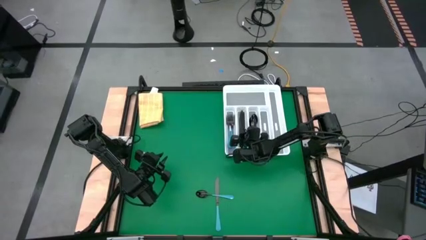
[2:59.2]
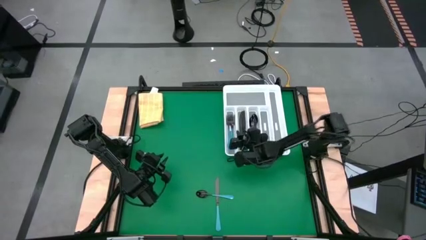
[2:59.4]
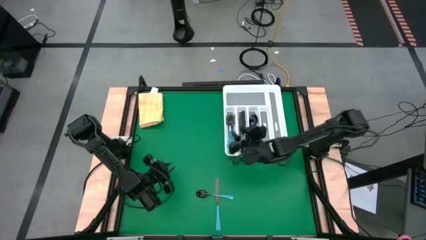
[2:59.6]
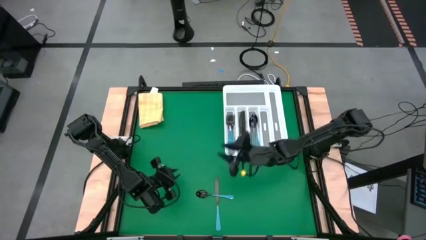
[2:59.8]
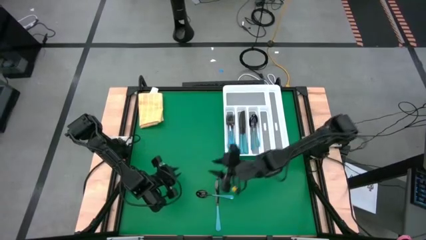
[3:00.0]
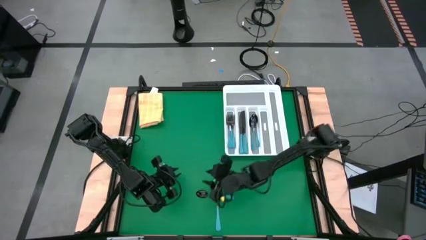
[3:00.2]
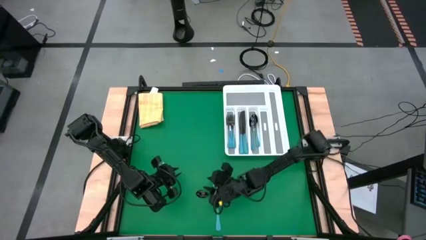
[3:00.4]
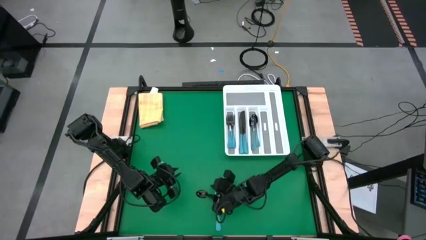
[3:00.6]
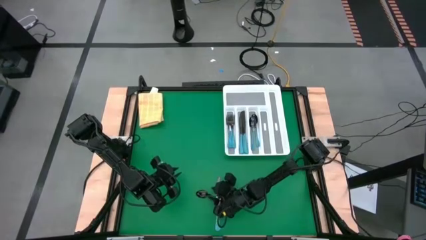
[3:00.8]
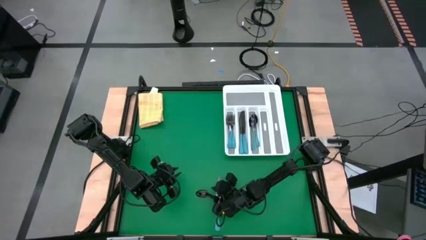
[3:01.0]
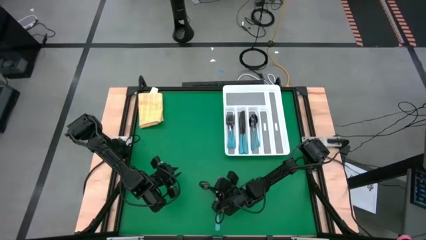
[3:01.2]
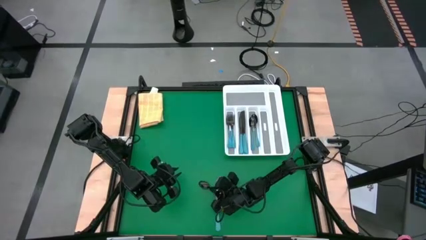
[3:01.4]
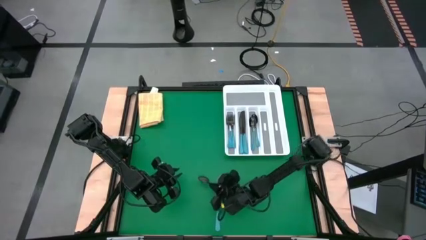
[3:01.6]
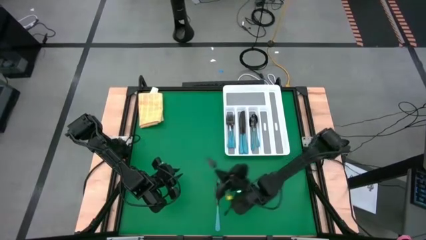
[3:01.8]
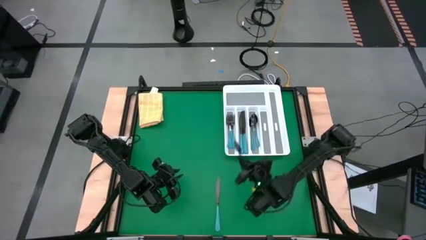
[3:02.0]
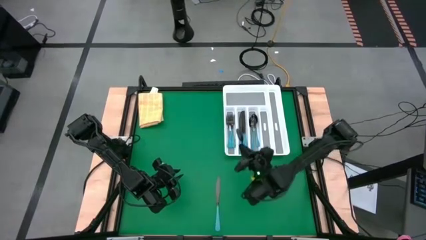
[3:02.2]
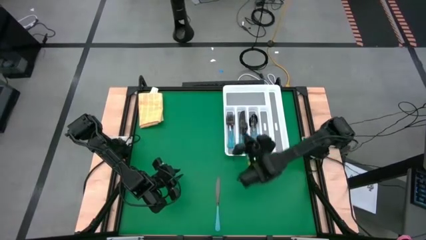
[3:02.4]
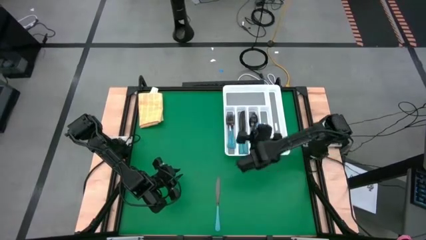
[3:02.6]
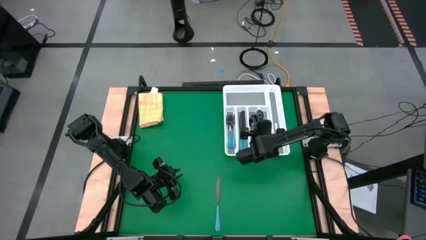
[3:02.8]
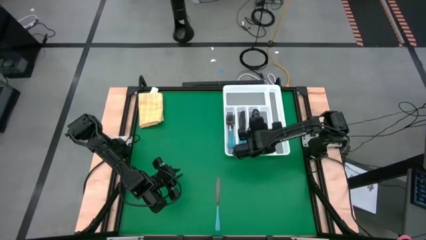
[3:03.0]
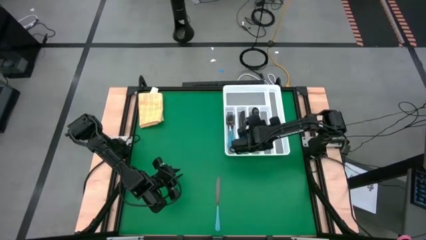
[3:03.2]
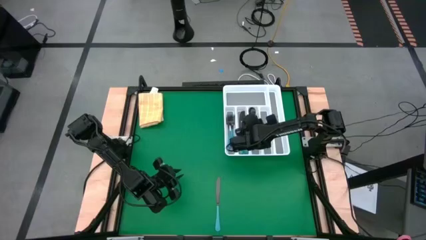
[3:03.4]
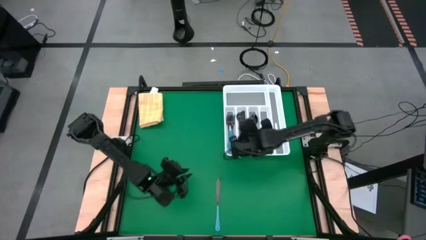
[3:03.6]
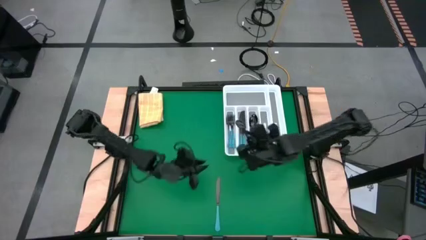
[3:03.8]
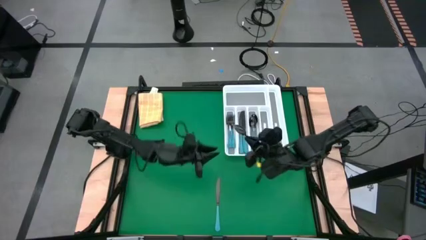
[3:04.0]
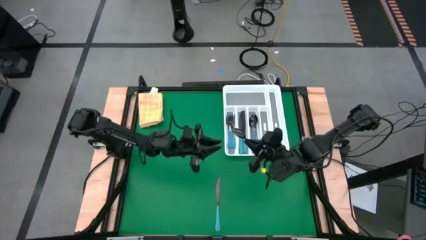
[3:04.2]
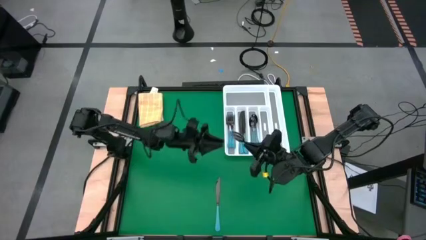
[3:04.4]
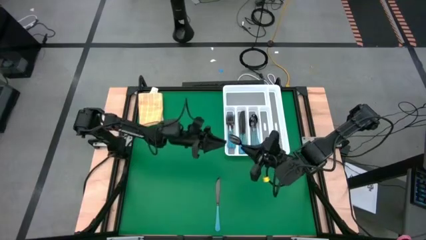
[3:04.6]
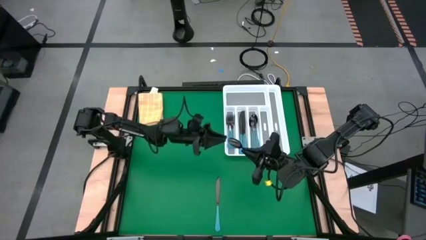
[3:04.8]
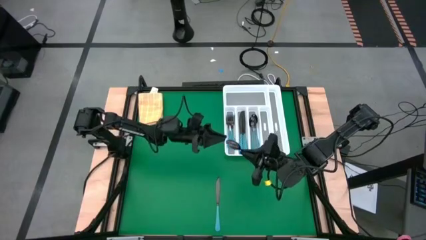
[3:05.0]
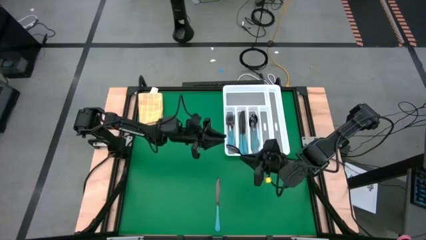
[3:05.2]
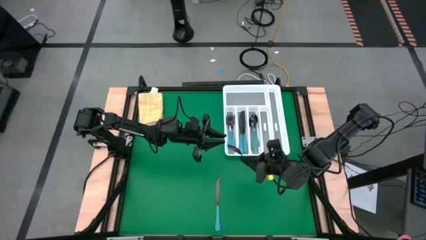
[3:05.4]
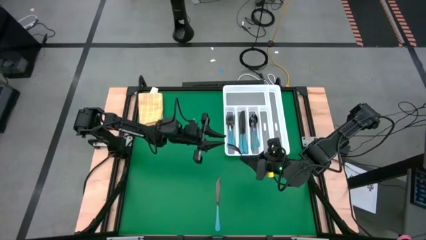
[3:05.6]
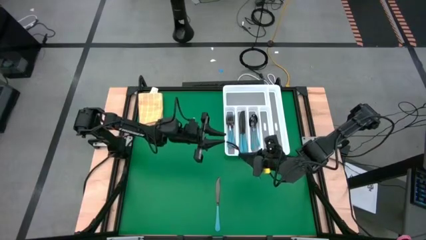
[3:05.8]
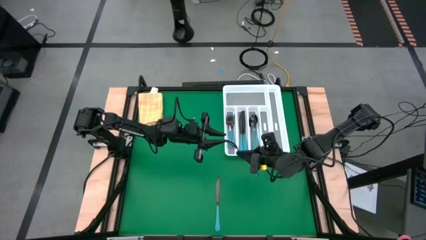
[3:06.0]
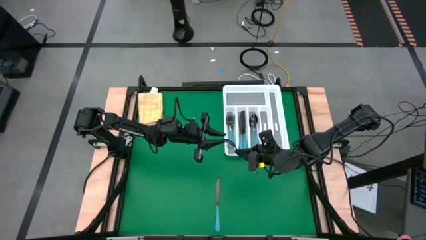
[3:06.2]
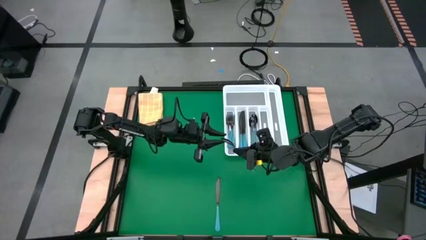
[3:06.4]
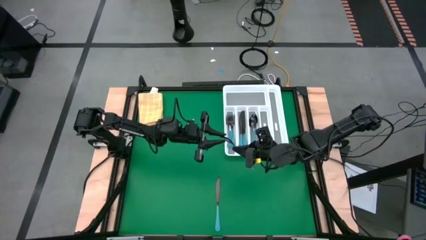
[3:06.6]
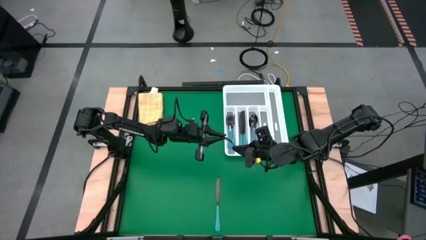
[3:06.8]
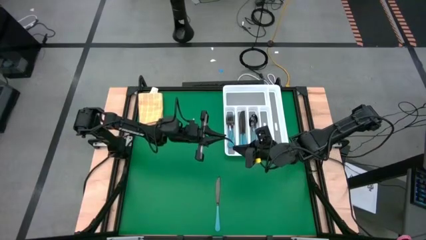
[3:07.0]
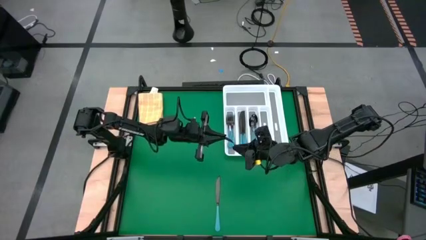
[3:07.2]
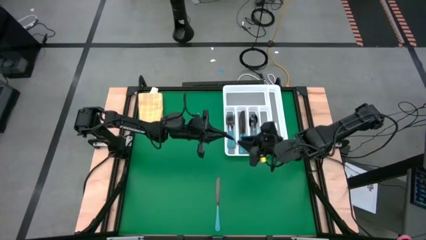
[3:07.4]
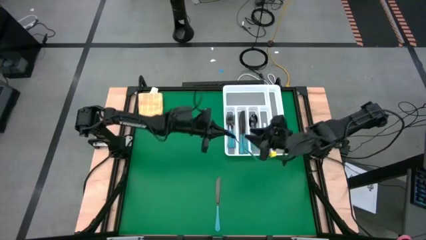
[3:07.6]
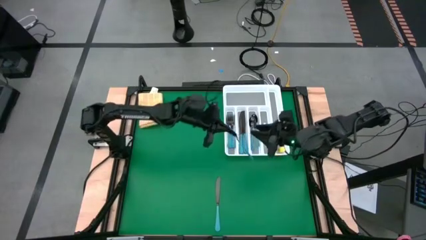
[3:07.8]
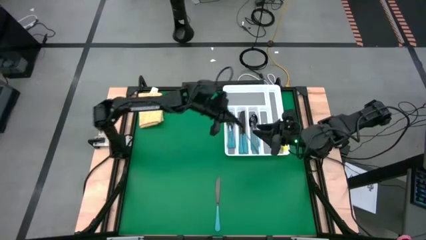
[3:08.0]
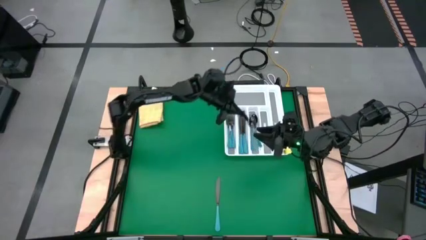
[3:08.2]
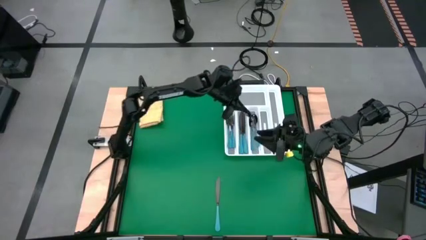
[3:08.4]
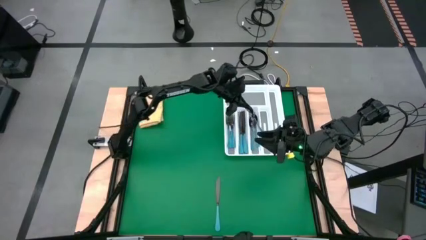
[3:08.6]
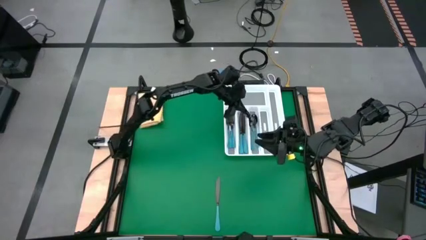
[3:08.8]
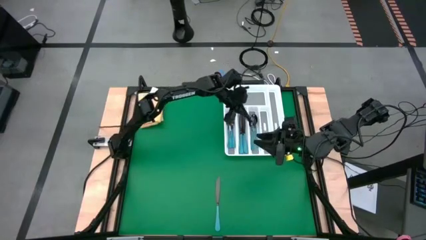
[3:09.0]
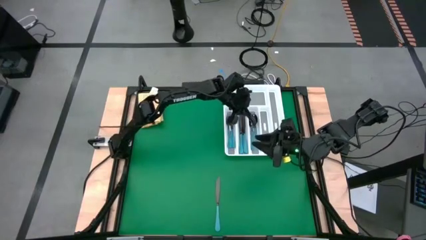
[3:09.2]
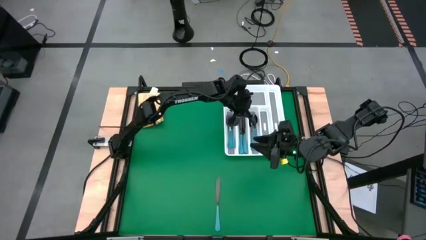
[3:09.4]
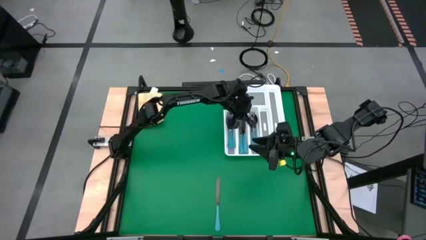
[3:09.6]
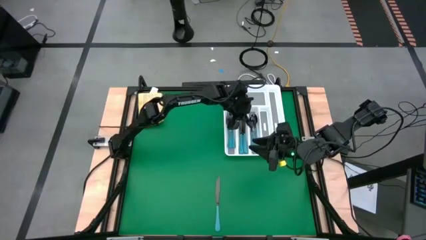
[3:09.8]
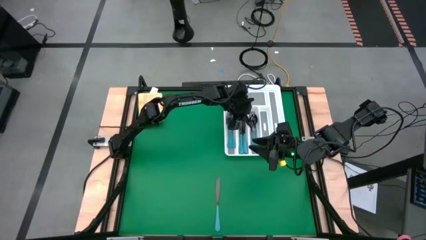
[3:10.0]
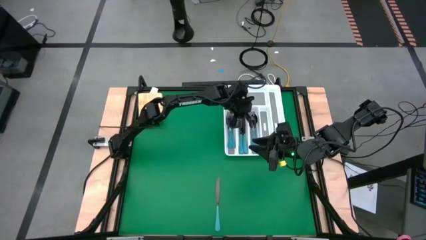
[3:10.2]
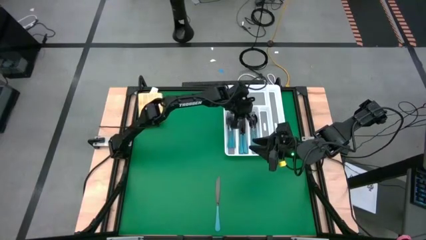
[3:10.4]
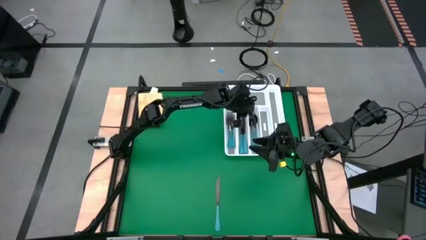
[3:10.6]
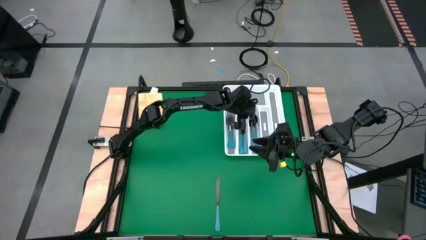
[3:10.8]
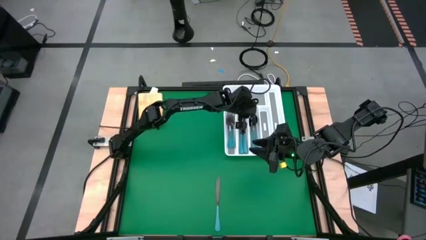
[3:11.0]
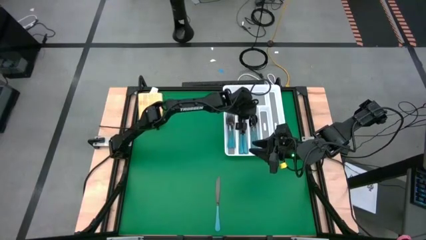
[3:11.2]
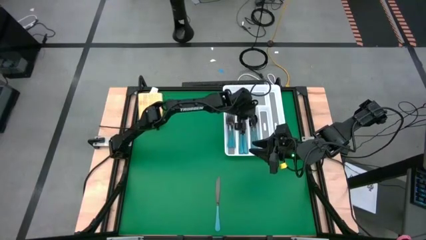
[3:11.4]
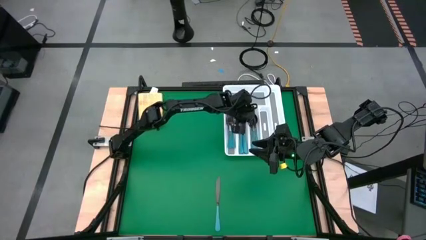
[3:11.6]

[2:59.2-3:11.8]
Task: Sort silverware
Put the blue spoon into the silverware organizer

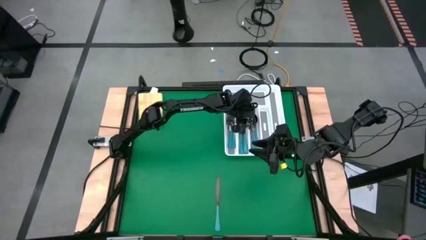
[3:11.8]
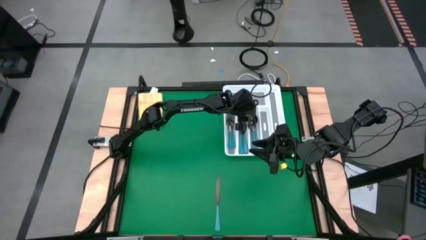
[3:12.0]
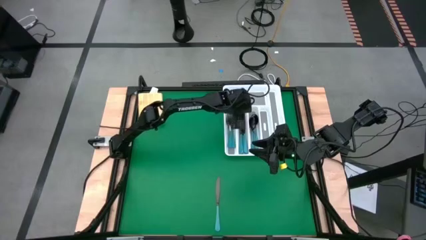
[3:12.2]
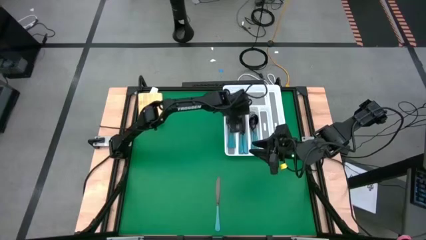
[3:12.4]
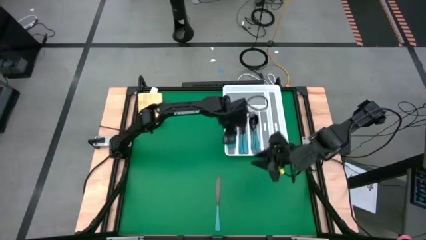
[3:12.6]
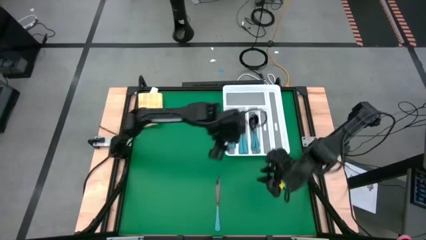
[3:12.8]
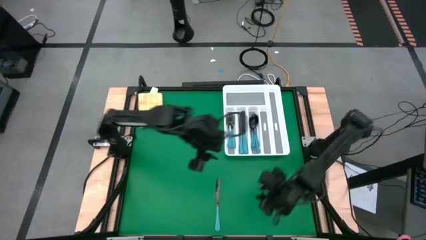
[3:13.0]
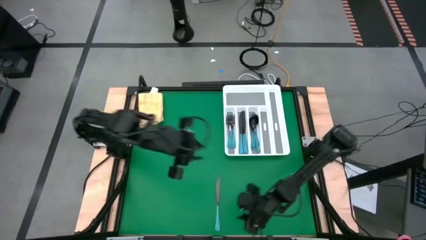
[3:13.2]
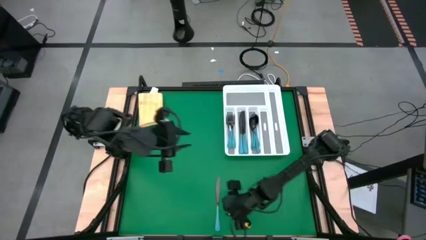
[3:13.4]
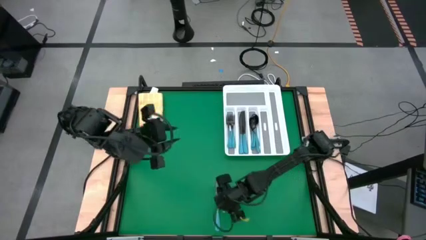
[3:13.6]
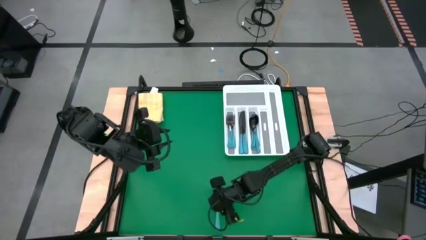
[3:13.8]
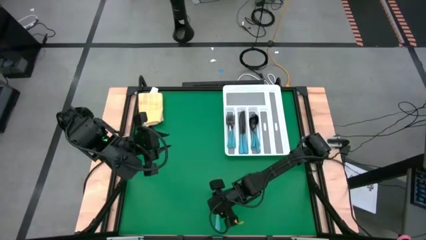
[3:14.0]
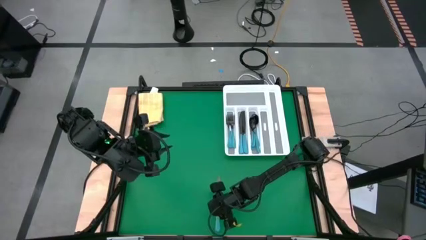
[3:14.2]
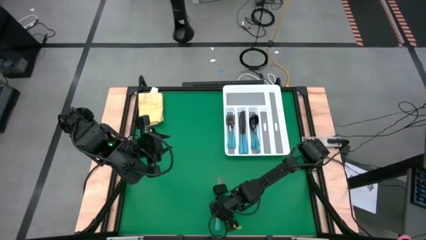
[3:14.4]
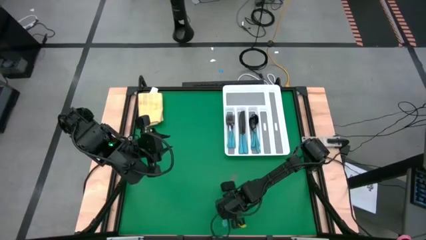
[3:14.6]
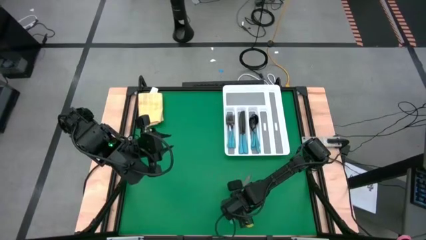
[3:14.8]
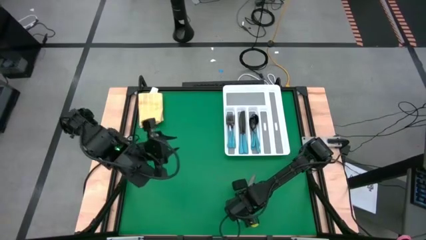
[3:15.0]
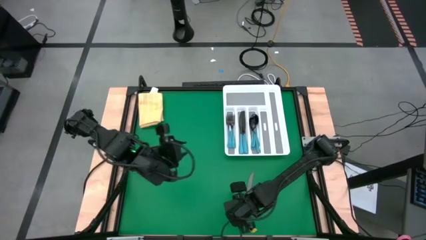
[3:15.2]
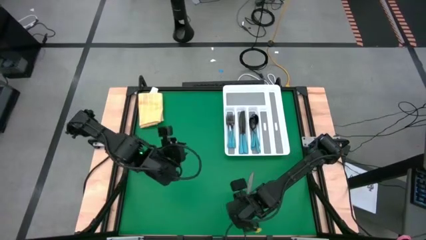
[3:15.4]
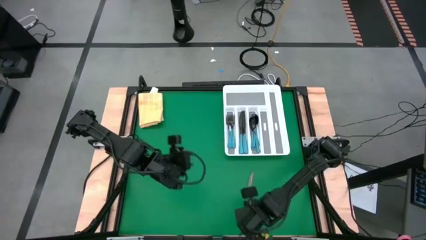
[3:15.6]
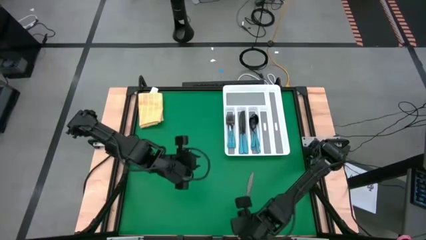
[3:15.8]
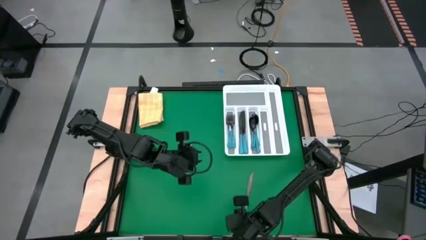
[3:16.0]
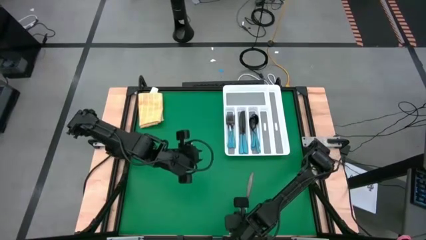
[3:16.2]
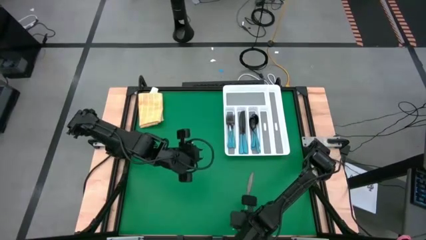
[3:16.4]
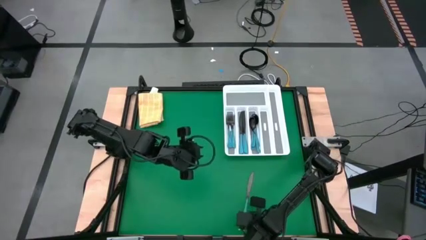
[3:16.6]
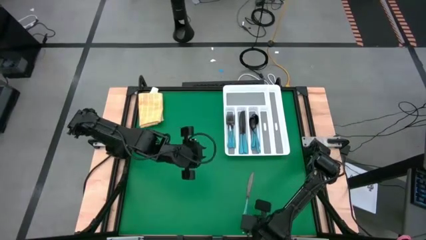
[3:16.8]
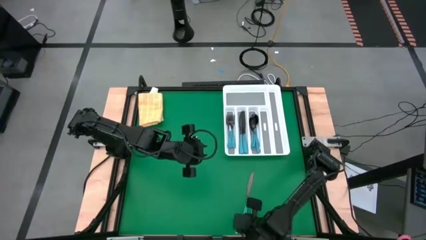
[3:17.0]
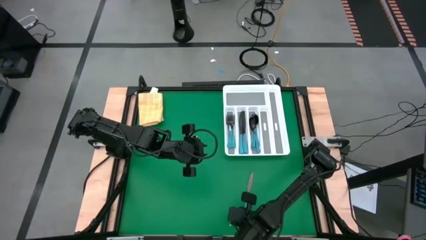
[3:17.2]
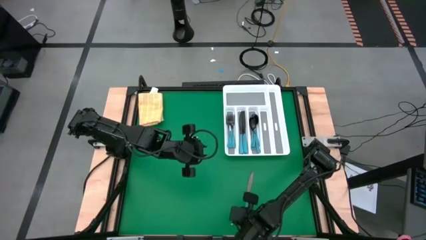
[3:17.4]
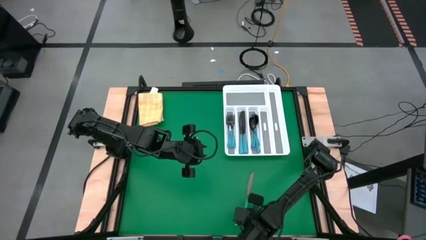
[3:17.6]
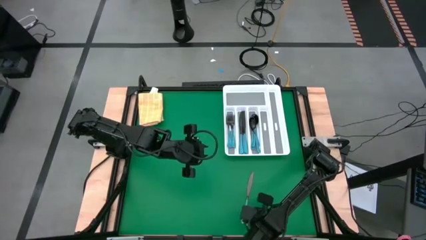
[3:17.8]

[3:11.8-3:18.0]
Put the blue table knife into the silverware organizer
